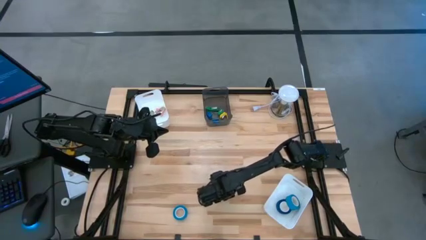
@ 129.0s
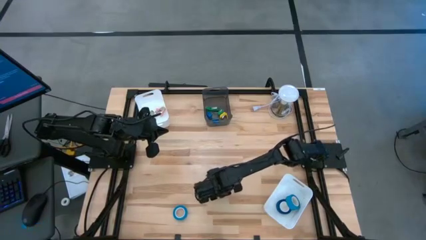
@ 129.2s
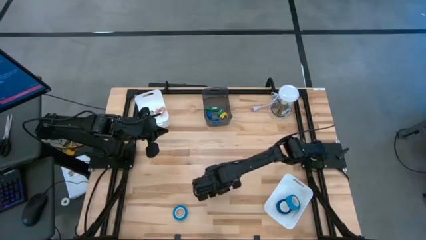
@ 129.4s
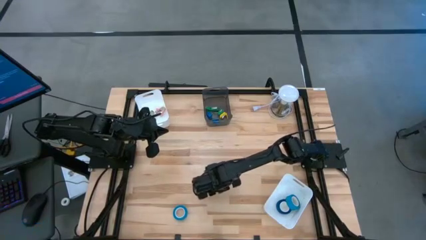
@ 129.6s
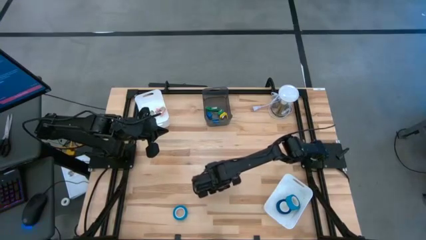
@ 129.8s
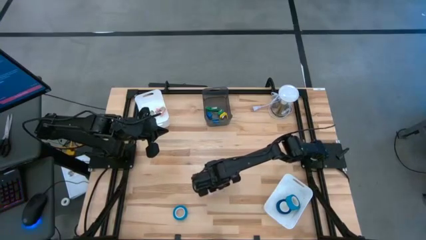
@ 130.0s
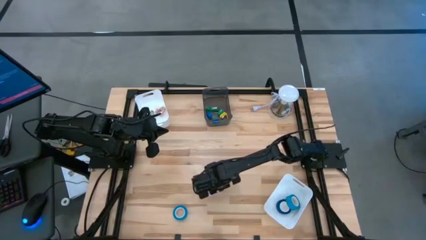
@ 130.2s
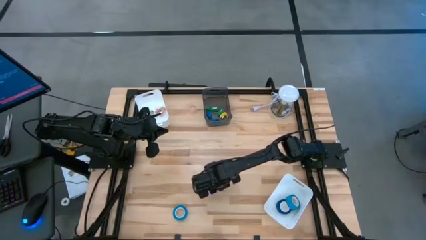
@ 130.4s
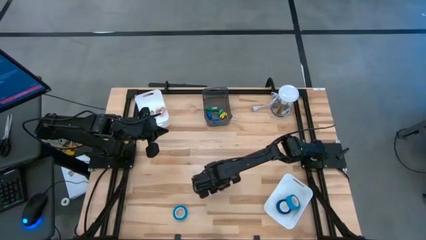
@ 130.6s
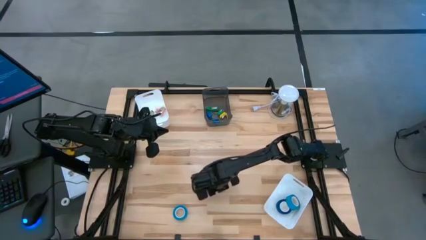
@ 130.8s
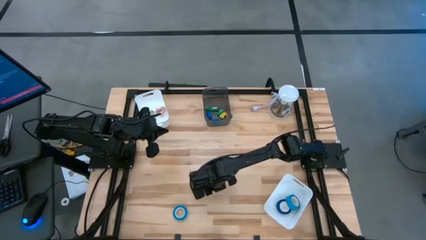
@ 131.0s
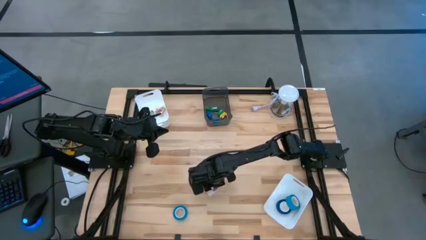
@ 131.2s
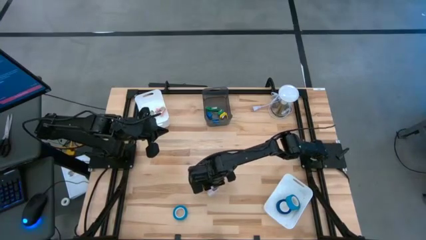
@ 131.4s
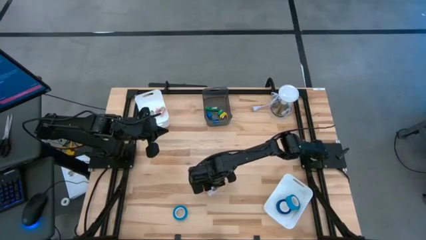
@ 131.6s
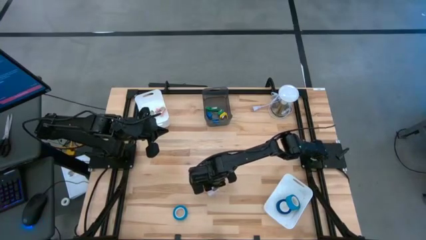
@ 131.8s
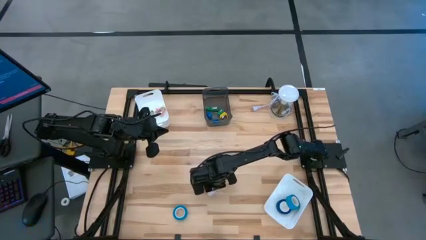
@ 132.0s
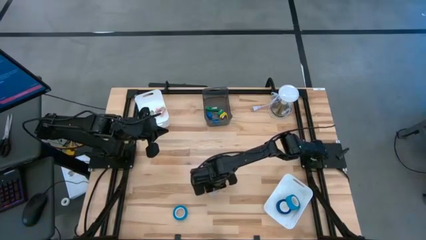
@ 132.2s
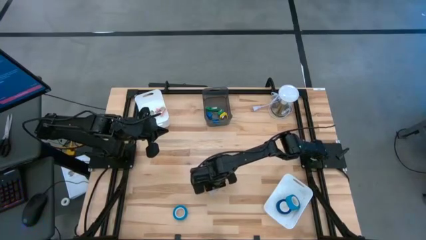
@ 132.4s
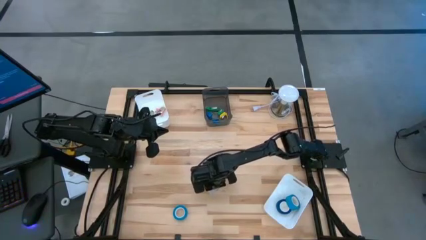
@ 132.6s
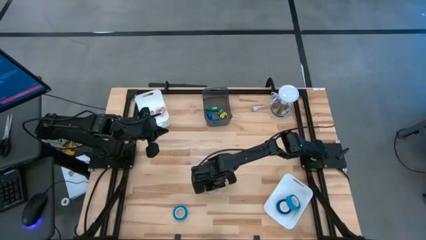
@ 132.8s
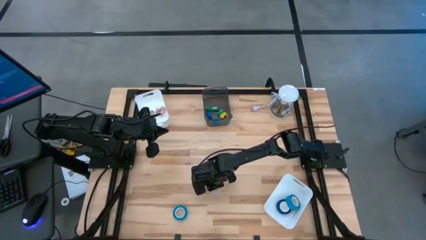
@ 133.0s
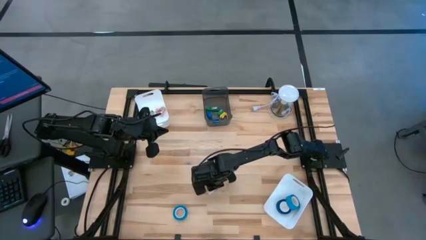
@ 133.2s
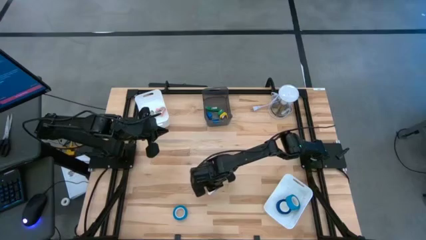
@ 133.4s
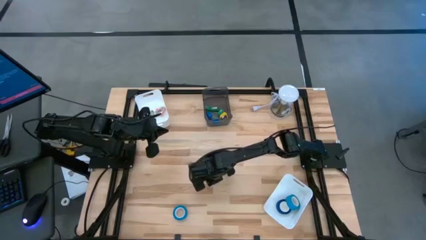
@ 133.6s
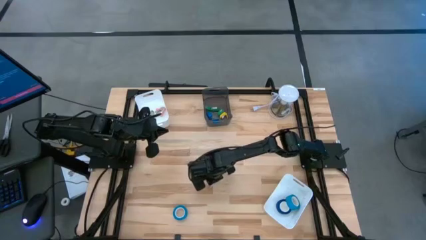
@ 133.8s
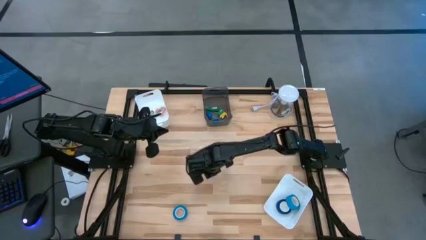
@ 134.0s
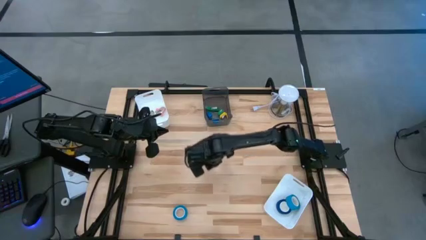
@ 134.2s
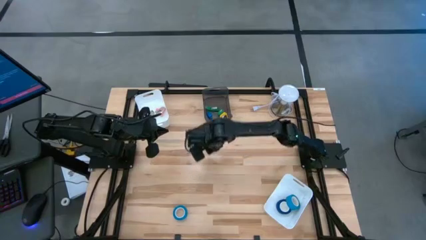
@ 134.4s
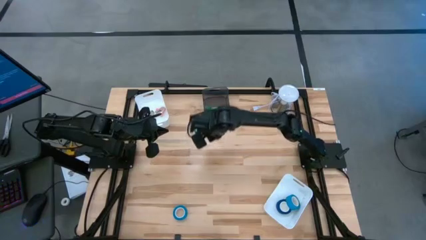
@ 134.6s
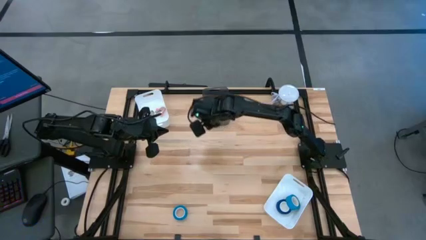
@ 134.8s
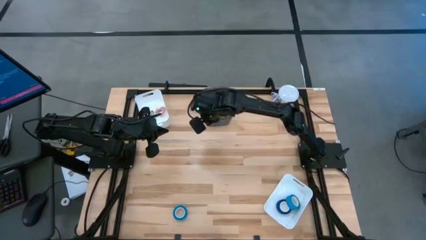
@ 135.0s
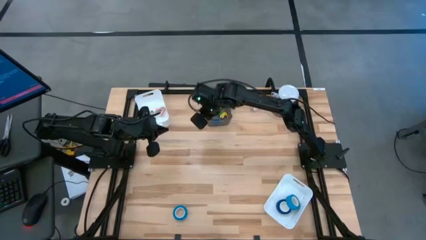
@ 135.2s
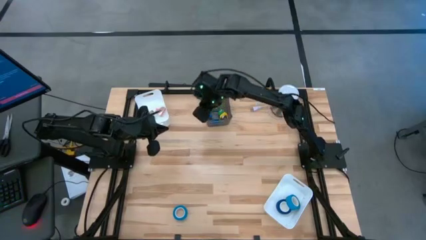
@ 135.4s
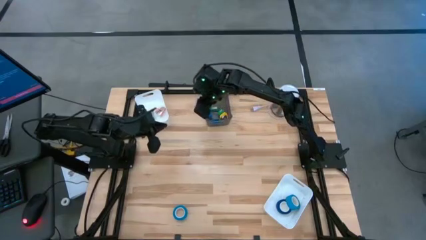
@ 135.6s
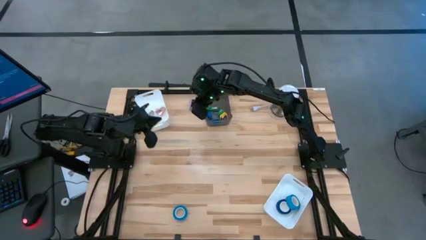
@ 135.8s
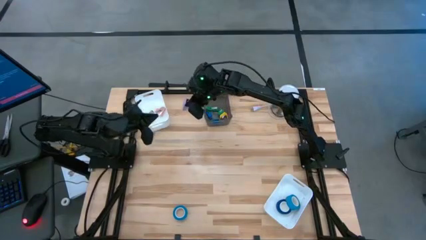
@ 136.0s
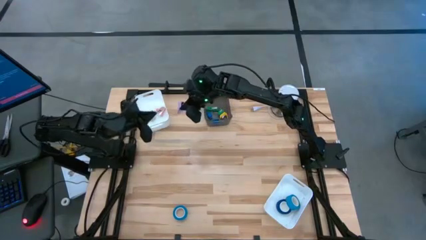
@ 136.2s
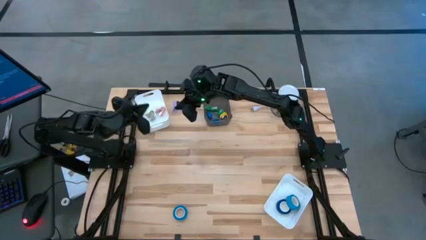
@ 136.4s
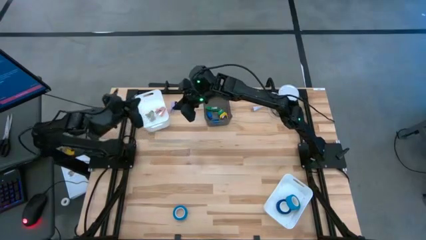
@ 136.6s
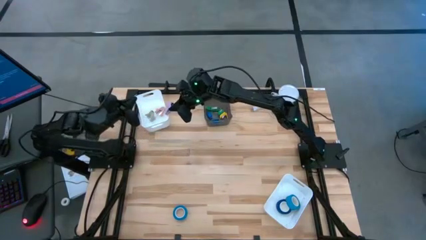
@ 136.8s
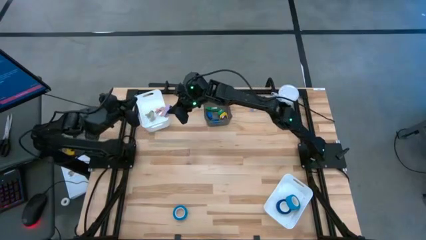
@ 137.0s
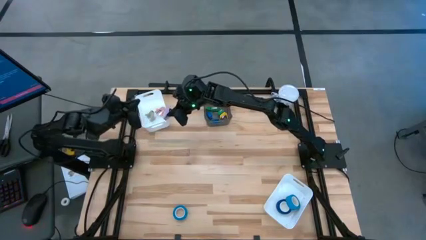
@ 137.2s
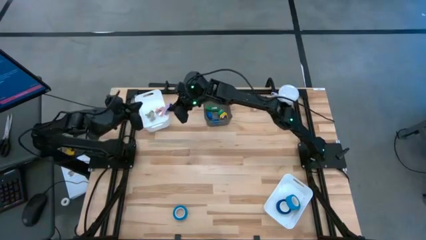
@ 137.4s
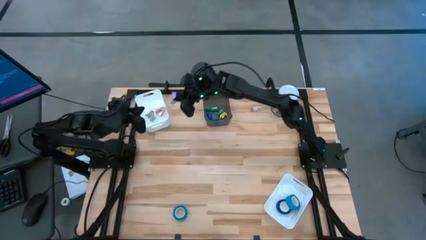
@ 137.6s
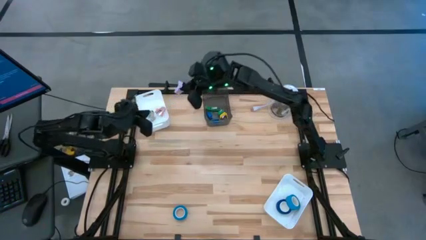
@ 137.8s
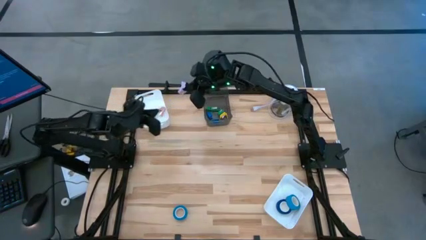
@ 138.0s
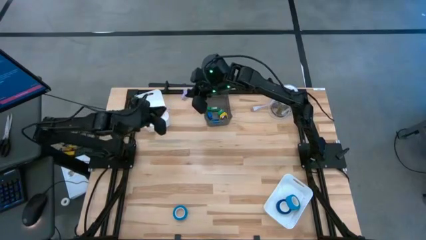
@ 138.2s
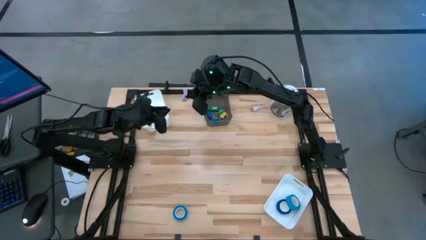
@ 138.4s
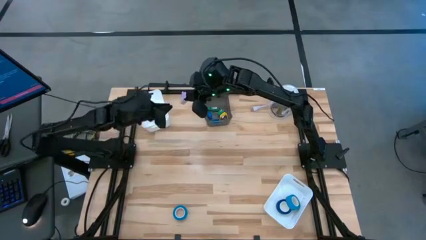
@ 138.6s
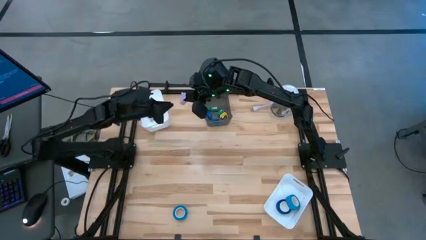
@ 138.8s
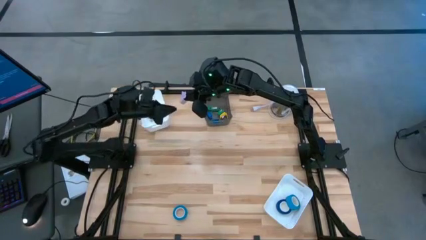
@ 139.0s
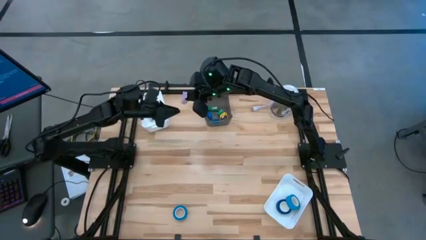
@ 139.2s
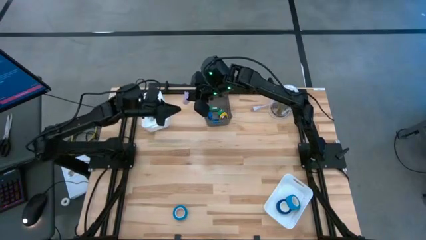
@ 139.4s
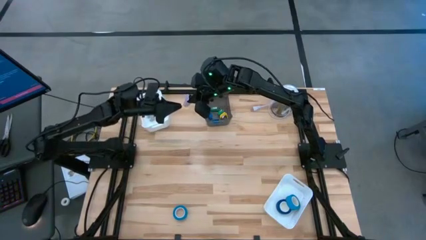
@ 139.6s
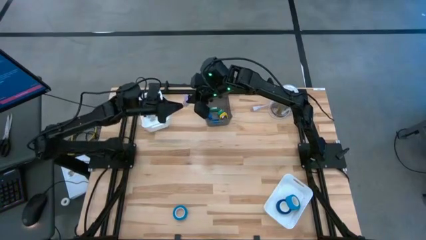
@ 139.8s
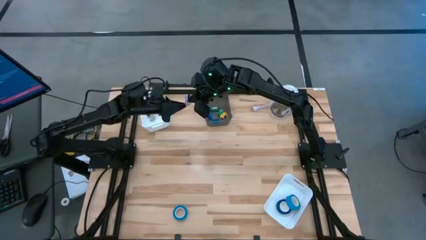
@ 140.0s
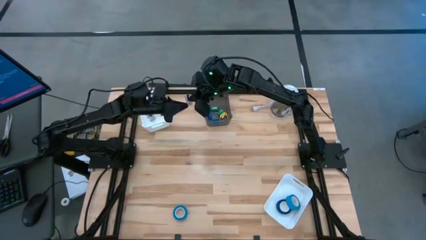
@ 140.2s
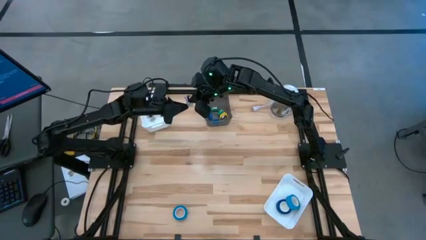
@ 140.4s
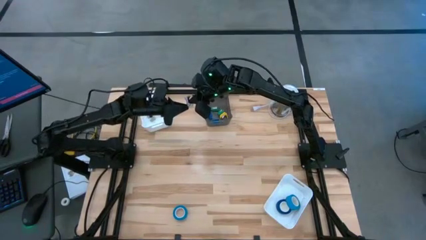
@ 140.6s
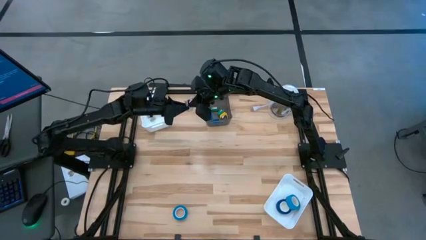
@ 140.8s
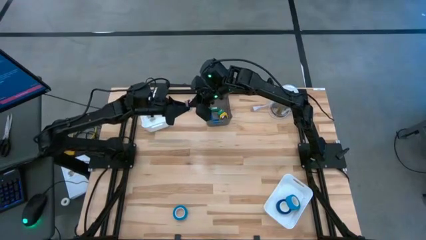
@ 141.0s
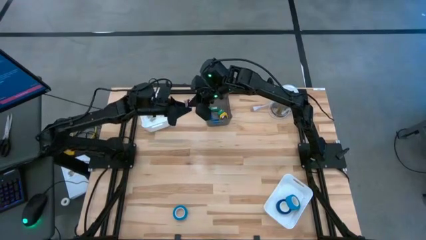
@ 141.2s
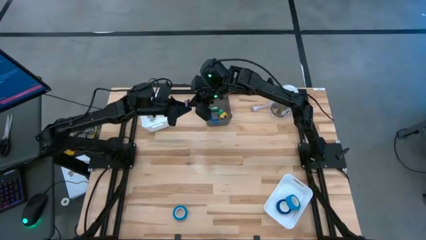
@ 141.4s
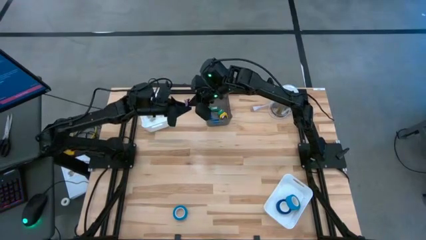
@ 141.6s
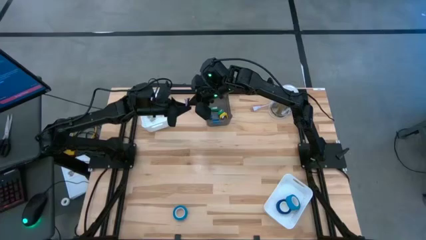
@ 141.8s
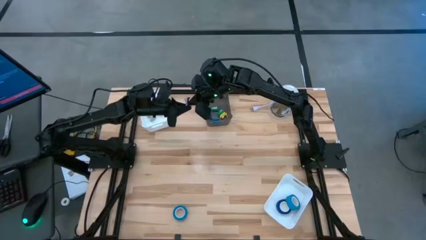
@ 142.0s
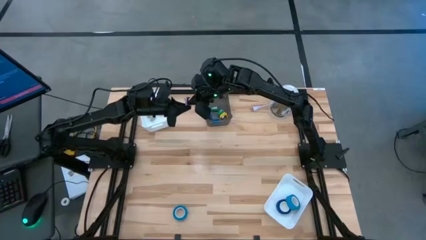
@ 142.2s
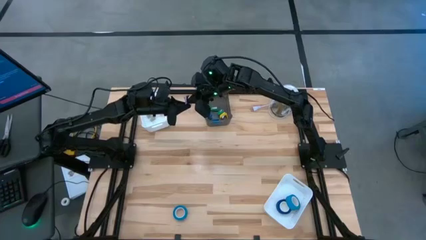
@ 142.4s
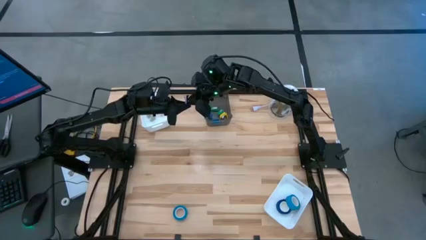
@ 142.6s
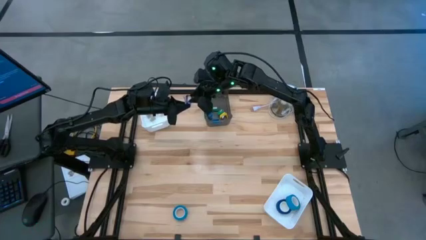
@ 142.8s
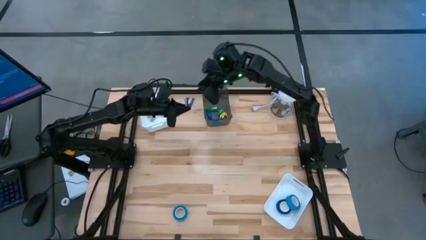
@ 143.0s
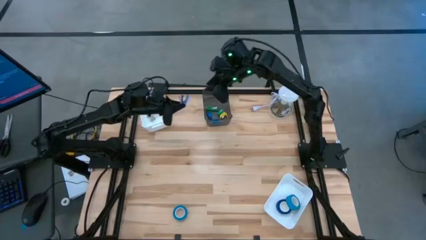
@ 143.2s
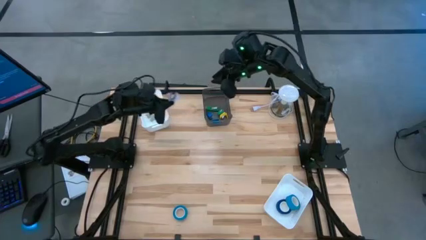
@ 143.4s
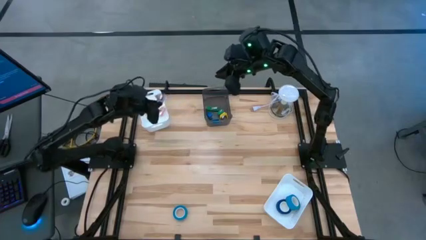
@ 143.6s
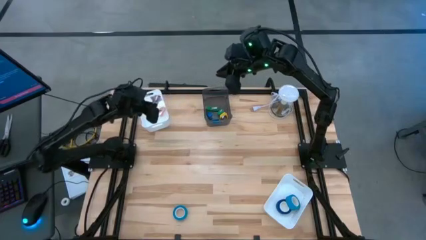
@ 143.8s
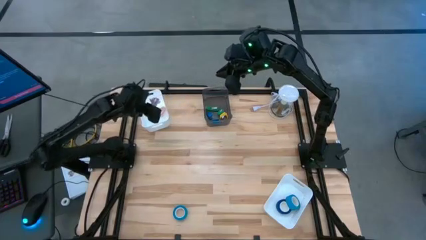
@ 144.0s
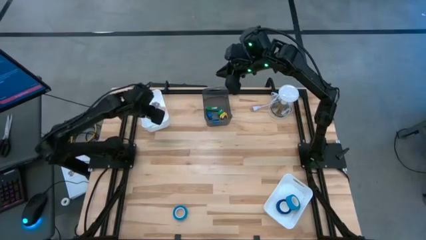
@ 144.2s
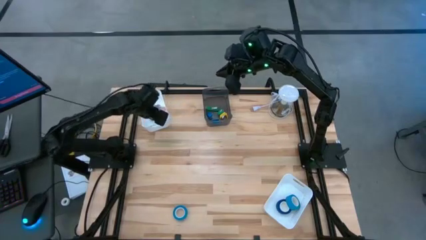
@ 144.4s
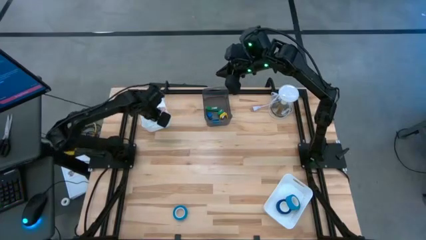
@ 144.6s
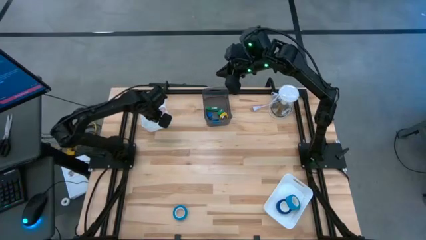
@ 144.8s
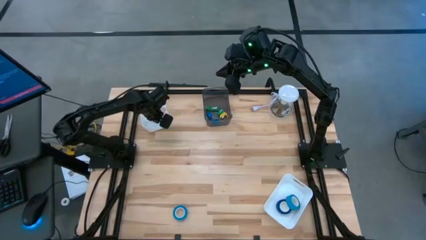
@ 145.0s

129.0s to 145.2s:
Task: Pick and place Stapler, Stapler remover, tape
Put the pink staple remover into the top white bin

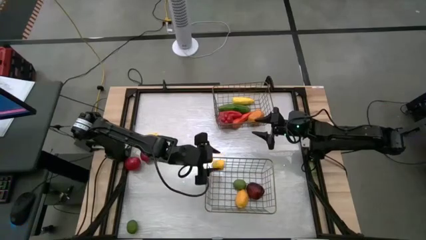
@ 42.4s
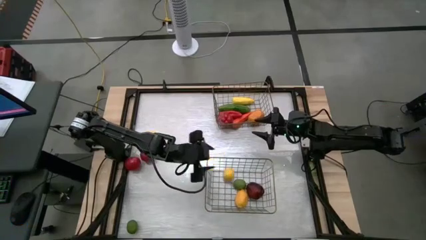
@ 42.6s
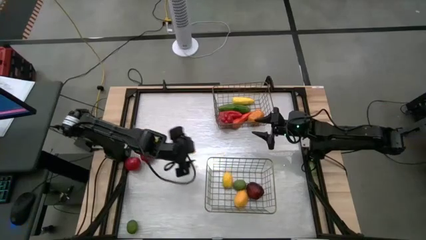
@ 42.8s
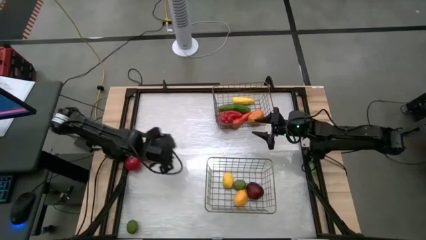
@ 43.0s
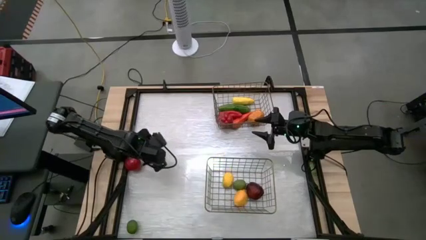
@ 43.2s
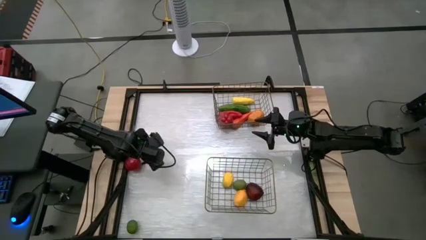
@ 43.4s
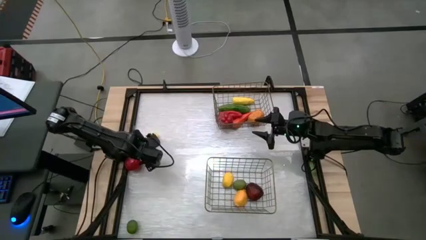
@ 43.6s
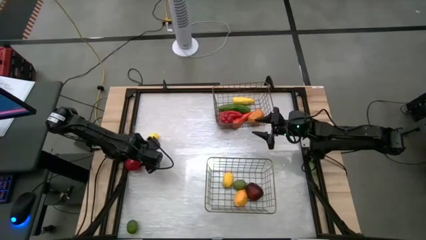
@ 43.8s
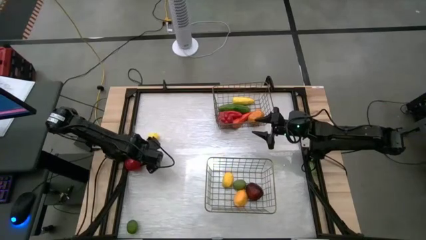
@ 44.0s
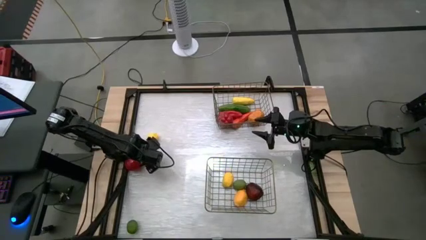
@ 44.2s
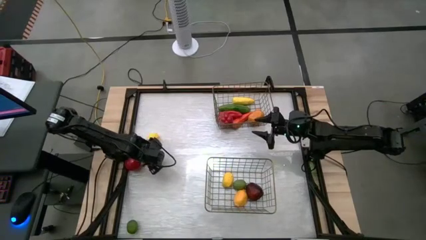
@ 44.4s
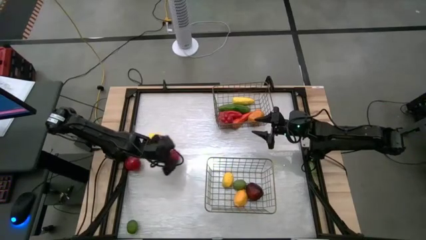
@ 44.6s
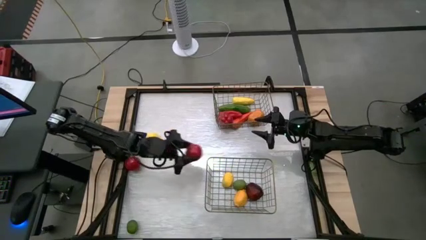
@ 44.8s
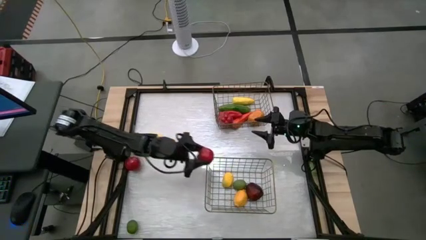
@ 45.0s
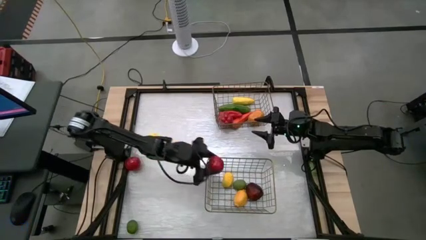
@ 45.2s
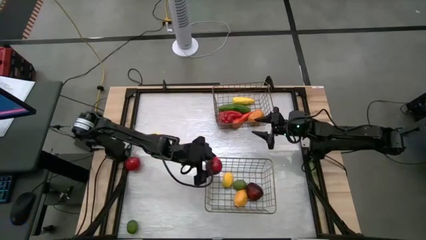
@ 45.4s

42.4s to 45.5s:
Task: Sort produce into baskets
Put the top red tomato into the bottom wire basket
